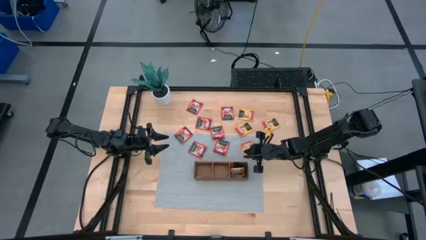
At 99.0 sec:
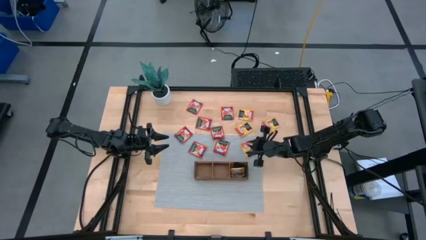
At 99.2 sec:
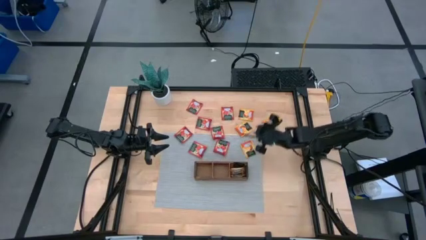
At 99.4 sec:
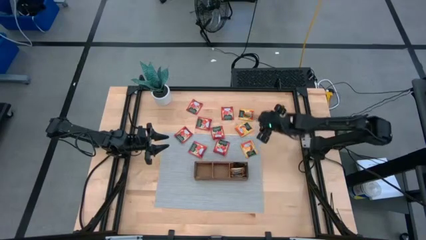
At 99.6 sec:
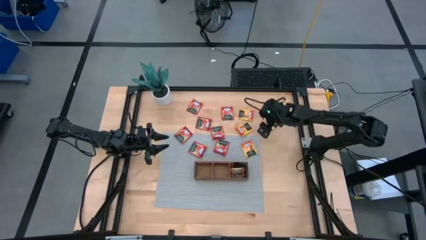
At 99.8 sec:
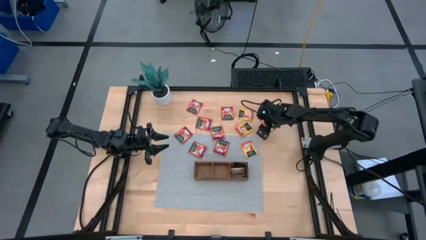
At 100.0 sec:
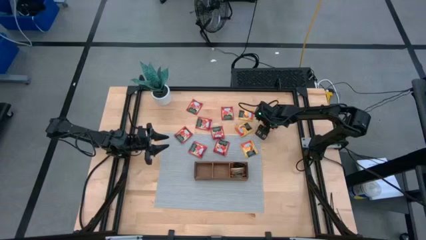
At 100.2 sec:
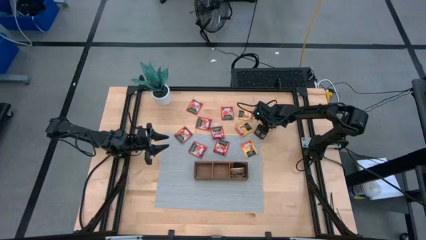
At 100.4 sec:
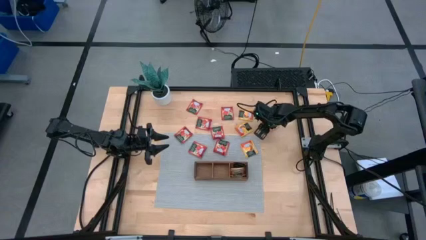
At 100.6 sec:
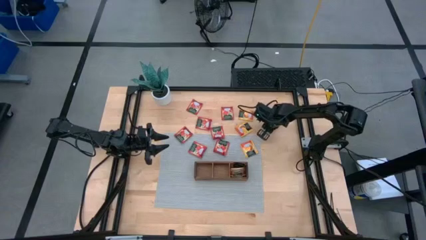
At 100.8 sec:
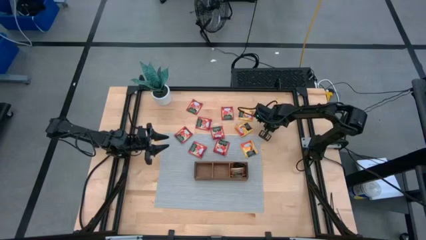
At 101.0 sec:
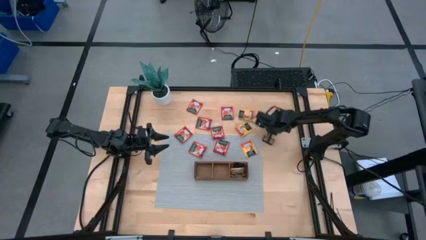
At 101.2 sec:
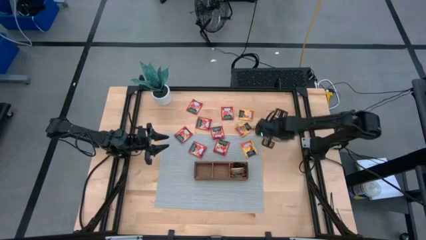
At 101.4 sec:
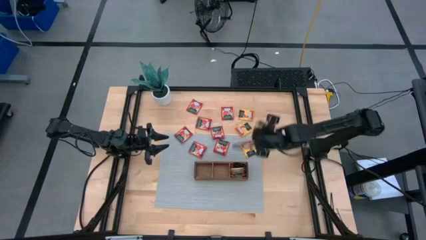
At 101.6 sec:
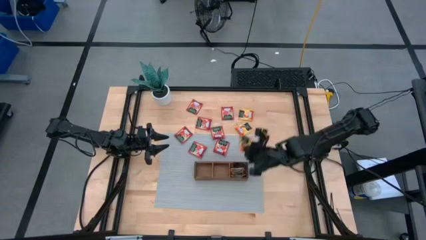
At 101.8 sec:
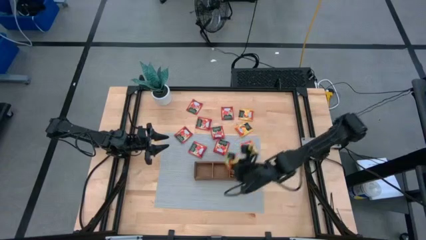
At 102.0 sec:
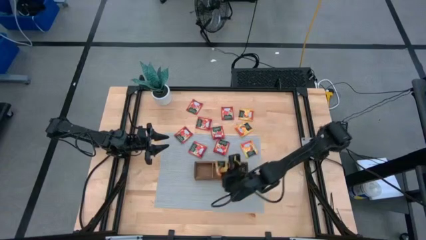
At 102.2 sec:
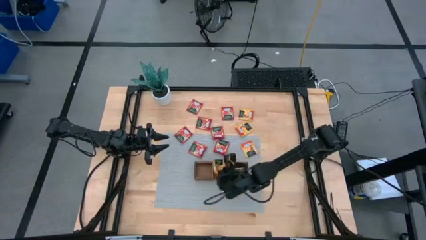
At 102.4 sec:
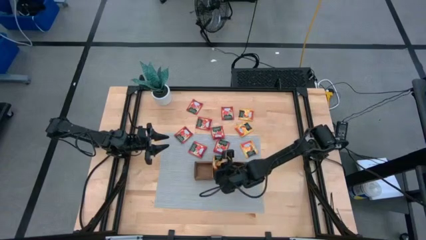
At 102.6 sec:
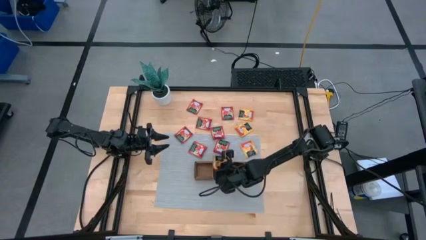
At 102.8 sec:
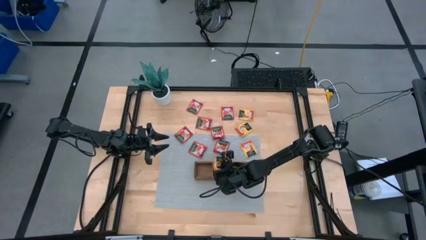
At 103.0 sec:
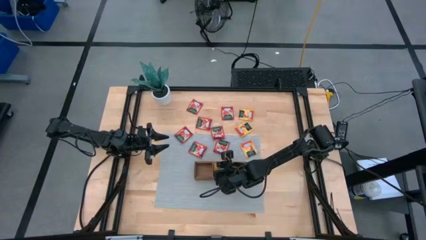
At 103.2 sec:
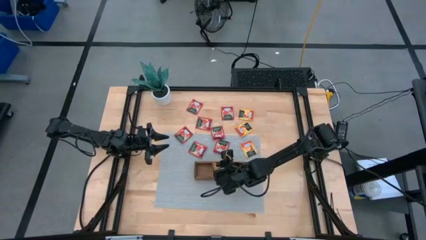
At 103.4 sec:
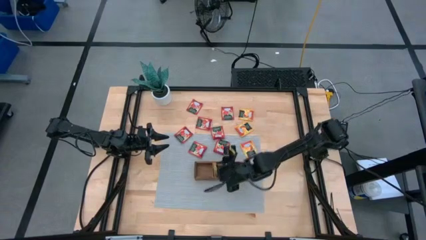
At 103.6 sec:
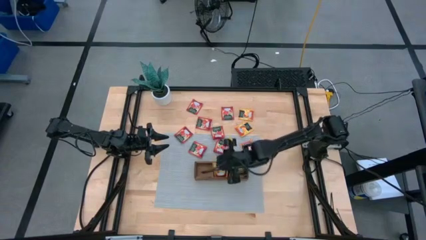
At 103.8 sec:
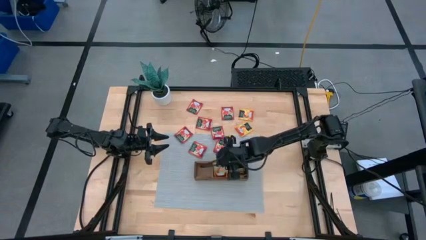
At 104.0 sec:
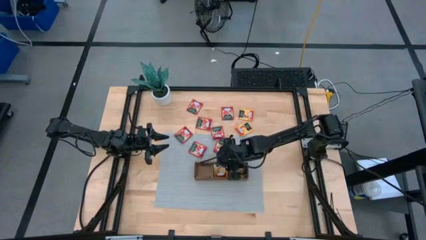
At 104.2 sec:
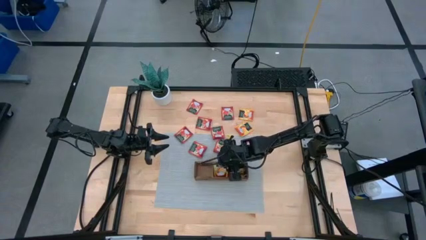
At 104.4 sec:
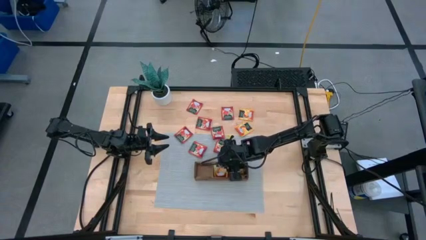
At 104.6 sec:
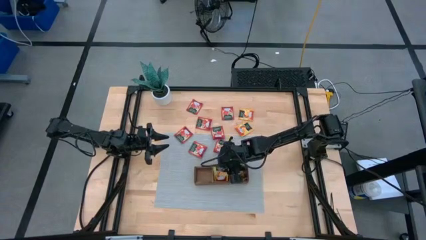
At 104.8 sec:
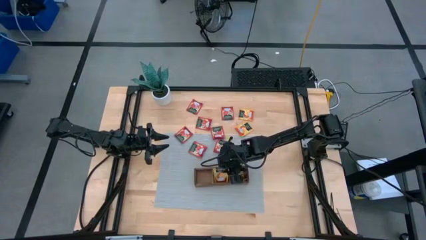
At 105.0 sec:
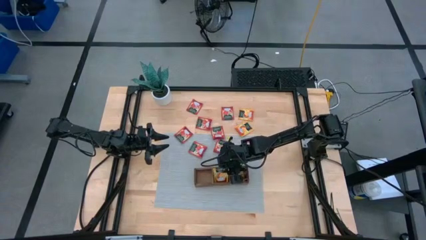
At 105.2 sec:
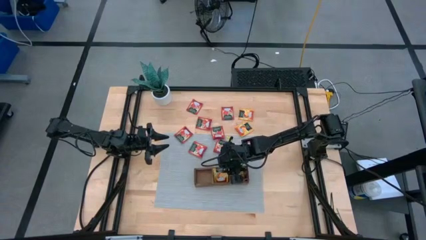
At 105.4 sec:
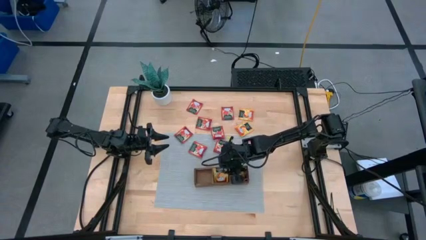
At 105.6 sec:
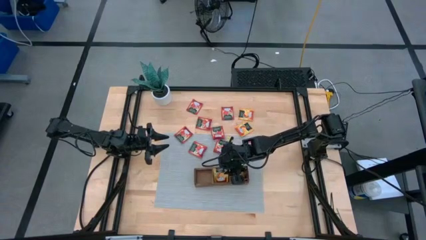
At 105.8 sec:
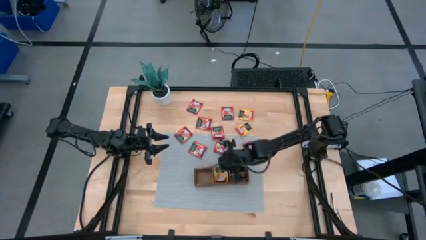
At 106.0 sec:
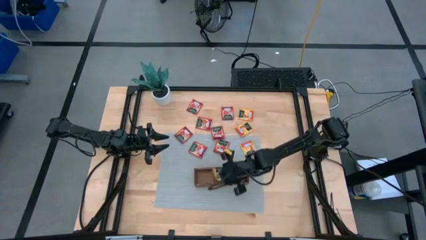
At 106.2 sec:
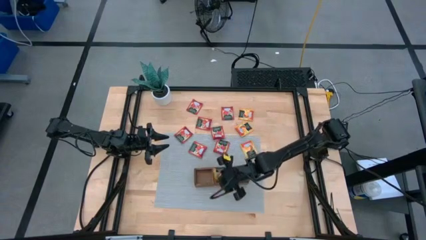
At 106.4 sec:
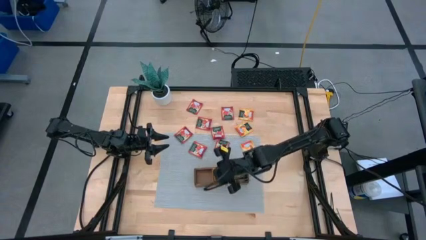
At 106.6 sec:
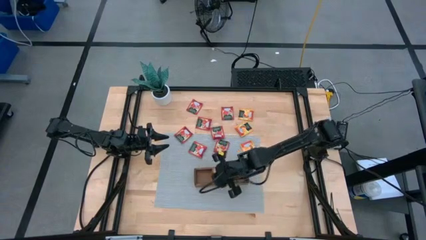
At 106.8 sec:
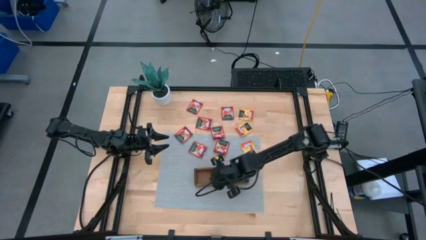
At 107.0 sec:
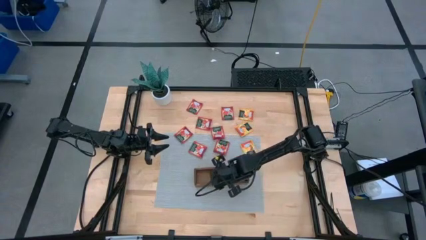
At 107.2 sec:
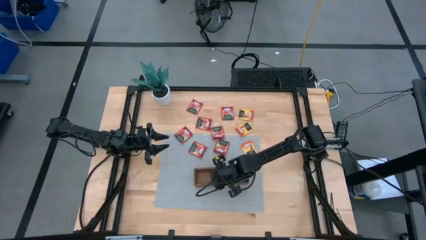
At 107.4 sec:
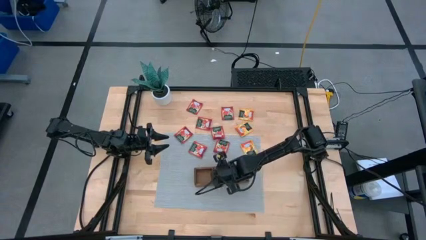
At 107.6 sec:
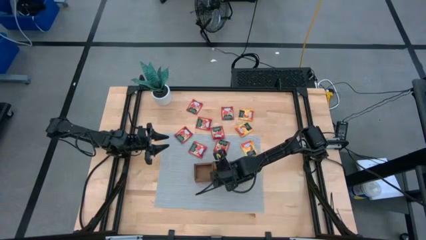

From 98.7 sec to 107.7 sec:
Task: Pick & Place Tea
Put the yellow tea bag into the middle compartment of the wood organizer

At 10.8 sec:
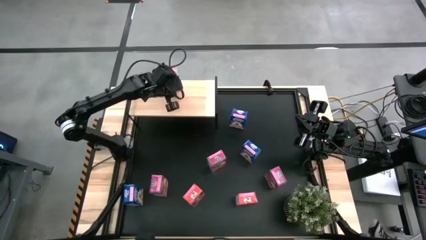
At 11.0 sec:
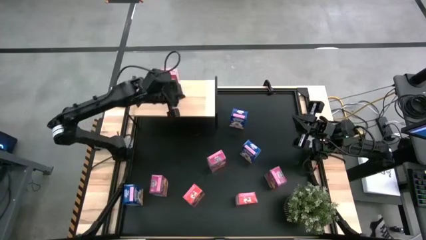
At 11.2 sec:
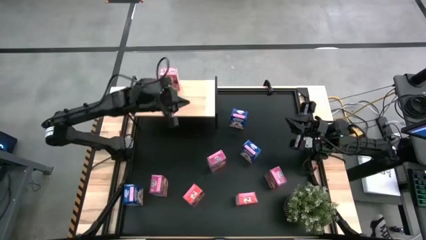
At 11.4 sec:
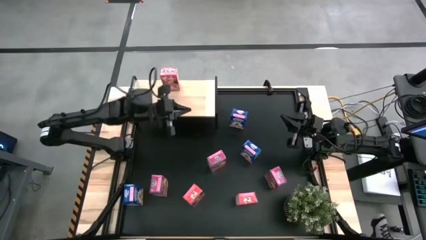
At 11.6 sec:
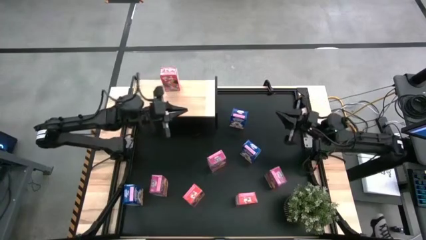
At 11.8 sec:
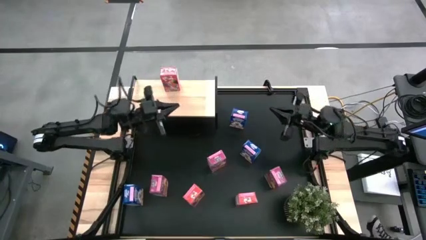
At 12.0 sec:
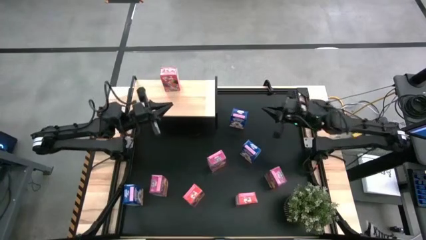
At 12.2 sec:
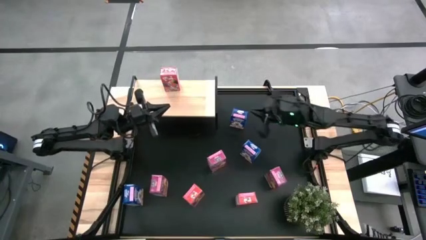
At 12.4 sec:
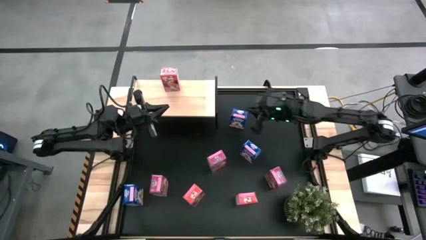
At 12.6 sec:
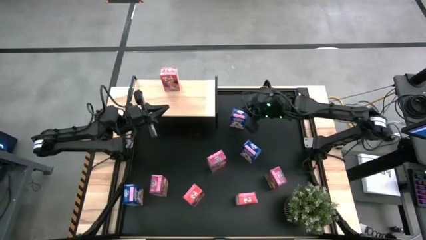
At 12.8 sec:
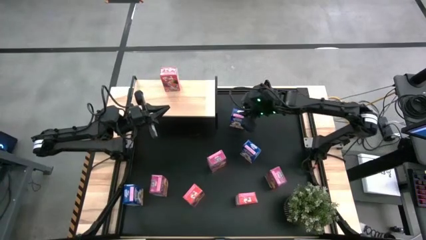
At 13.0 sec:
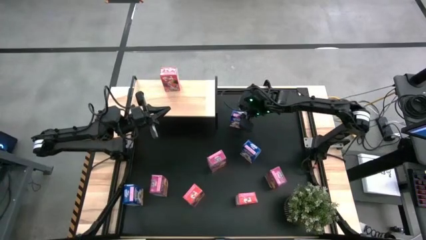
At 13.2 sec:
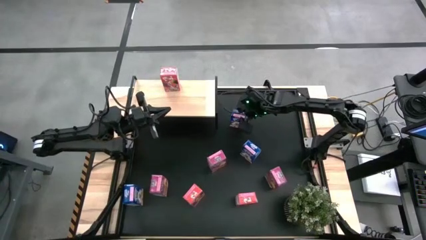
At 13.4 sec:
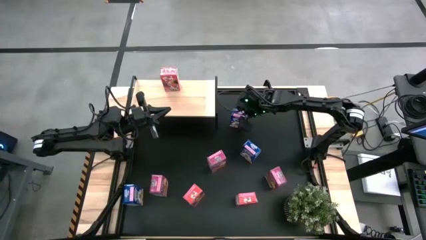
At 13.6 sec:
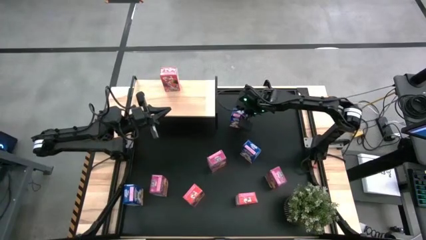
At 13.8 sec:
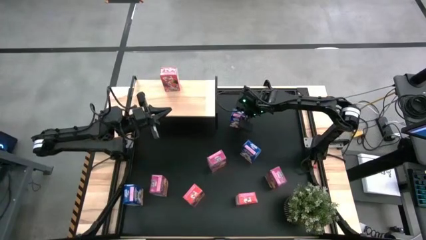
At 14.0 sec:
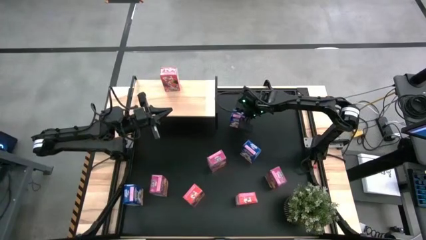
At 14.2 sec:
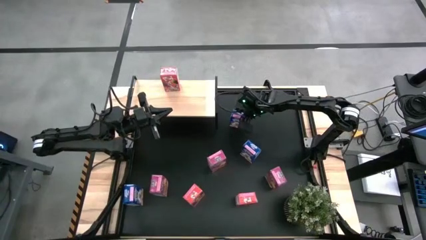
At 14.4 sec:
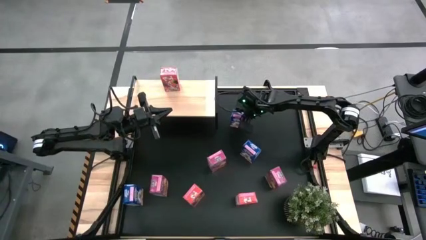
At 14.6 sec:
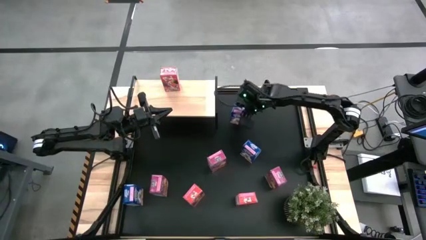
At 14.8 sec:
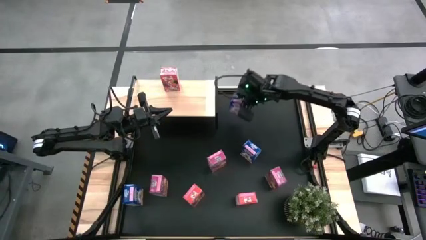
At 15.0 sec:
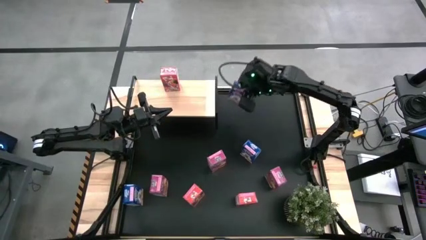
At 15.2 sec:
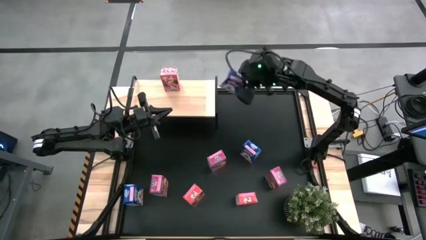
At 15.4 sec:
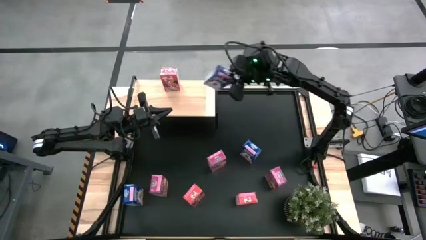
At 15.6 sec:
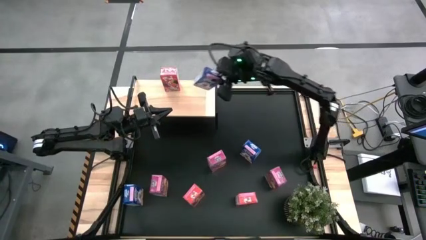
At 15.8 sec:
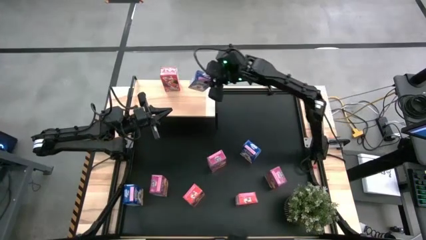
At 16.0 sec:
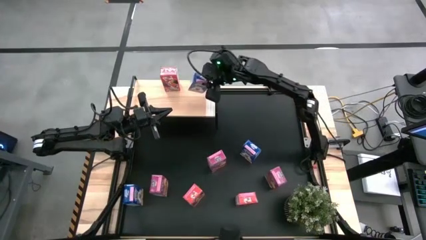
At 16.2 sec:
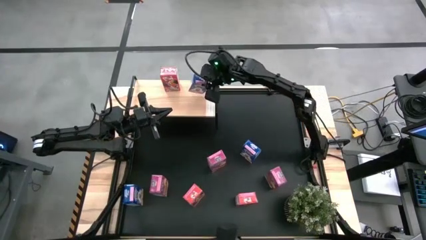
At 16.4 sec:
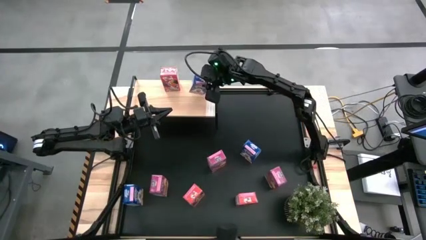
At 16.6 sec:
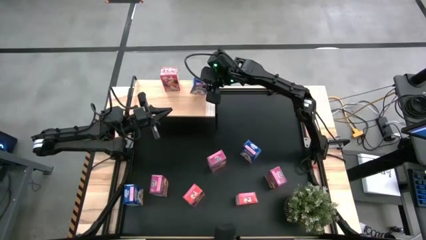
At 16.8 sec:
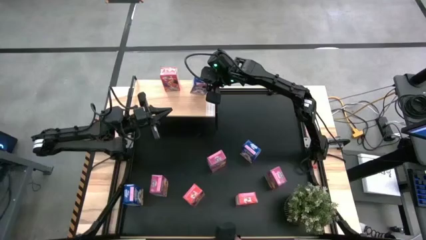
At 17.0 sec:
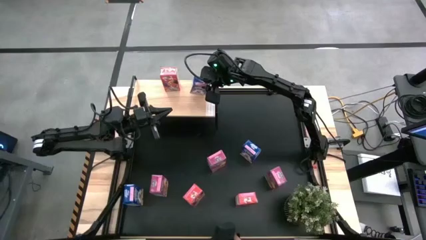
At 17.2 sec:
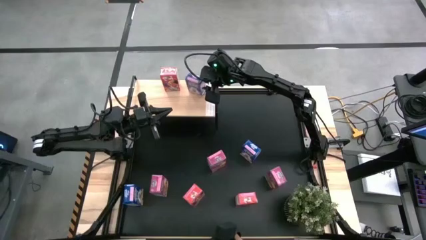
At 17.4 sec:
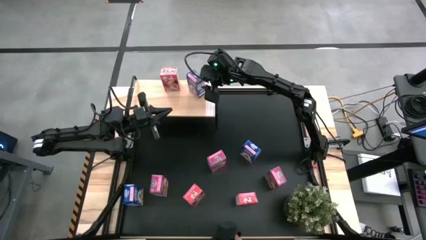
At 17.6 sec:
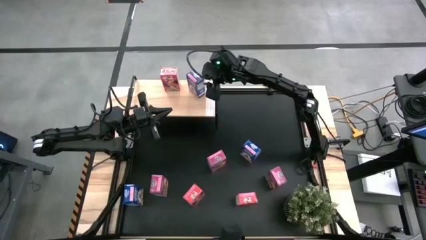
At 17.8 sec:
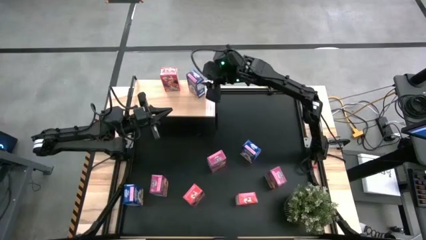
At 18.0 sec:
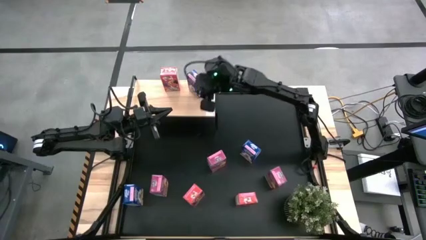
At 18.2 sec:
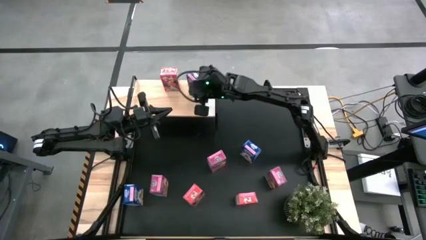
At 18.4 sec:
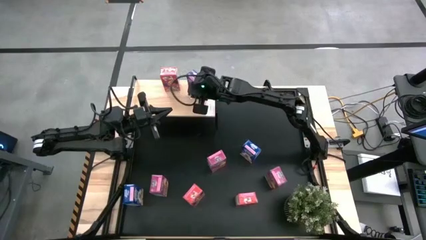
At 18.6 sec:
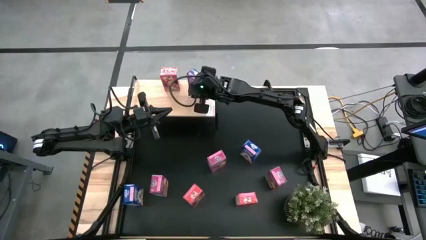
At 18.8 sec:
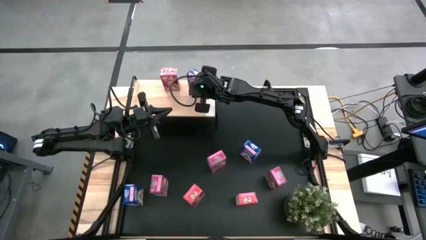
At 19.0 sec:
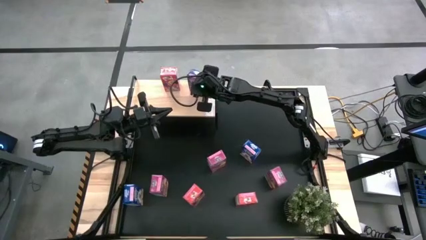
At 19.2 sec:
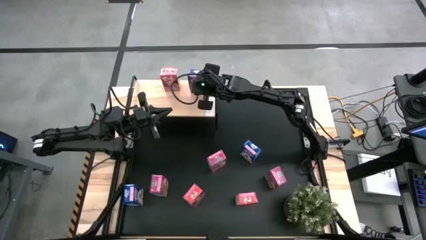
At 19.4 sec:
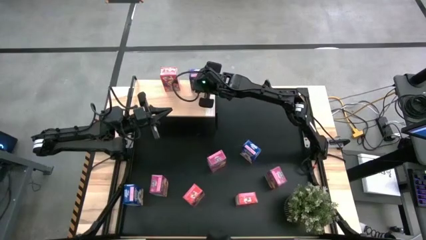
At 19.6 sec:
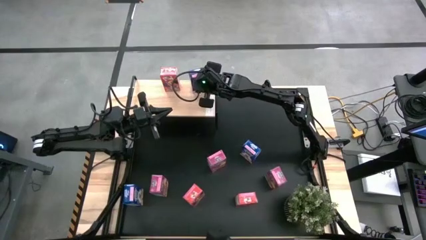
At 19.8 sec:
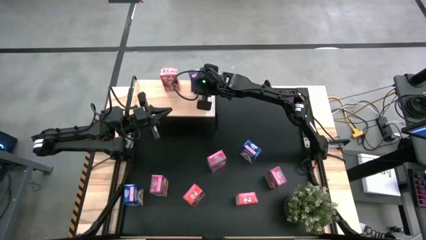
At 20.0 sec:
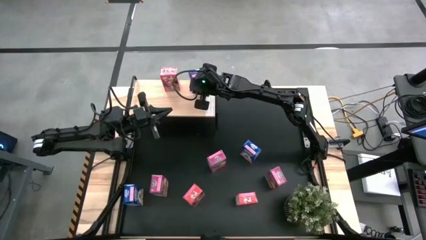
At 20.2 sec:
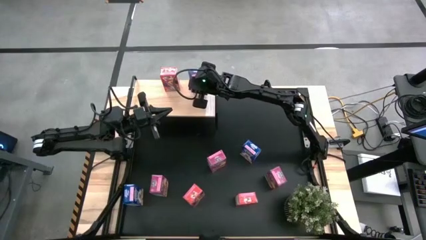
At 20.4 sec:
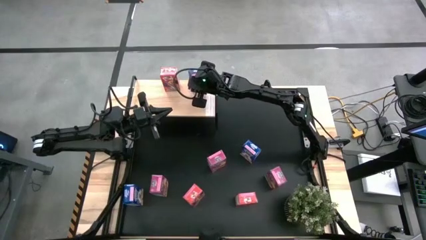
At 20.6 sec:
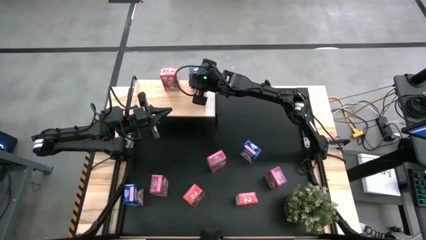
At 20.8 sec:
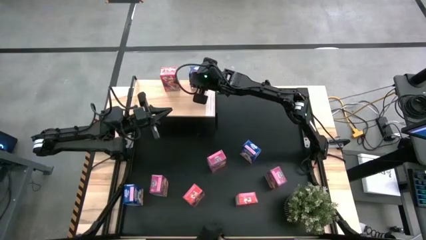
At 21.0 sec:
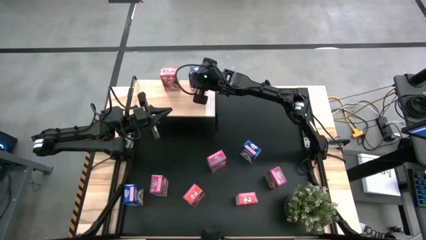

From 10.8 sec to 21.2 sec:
Task: Stack cereal on shelf
Put the top blue cereal box on the shelf
